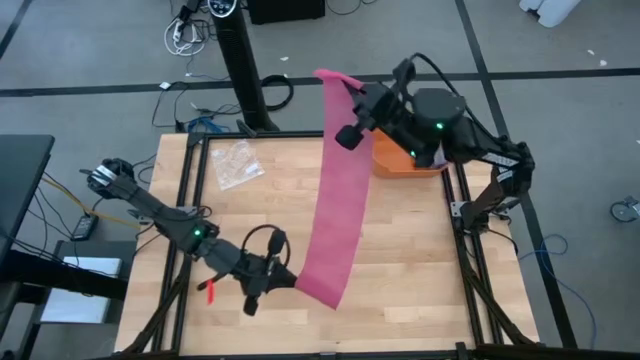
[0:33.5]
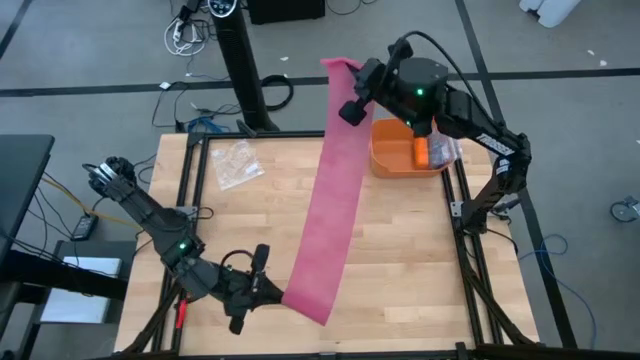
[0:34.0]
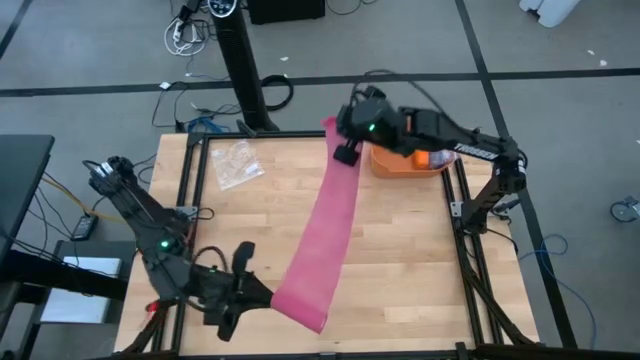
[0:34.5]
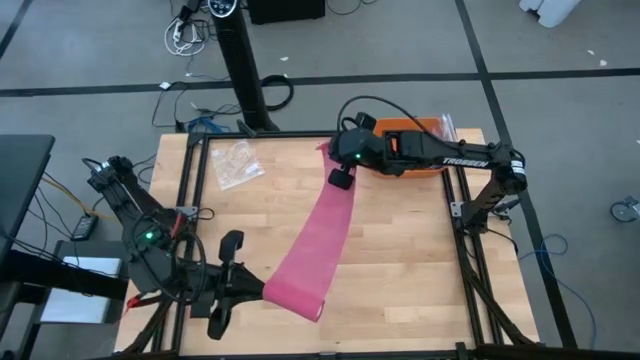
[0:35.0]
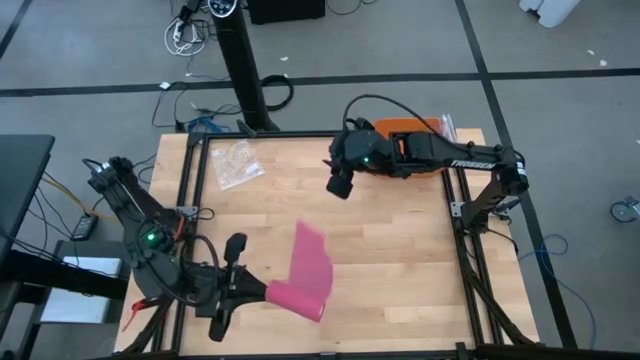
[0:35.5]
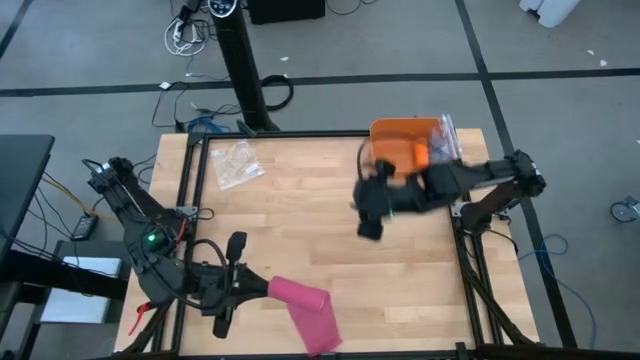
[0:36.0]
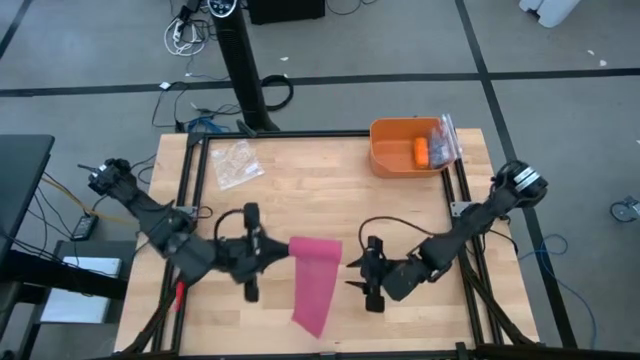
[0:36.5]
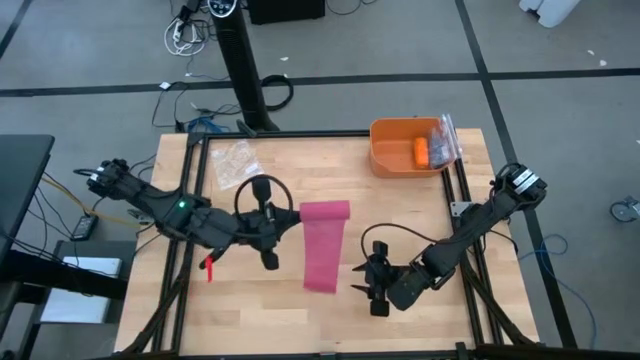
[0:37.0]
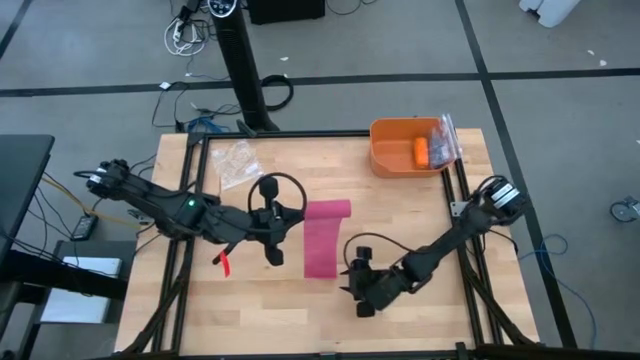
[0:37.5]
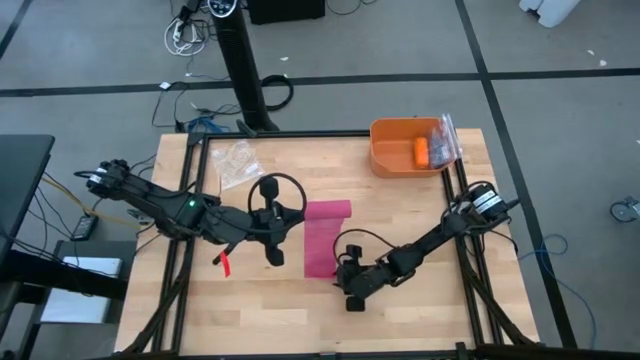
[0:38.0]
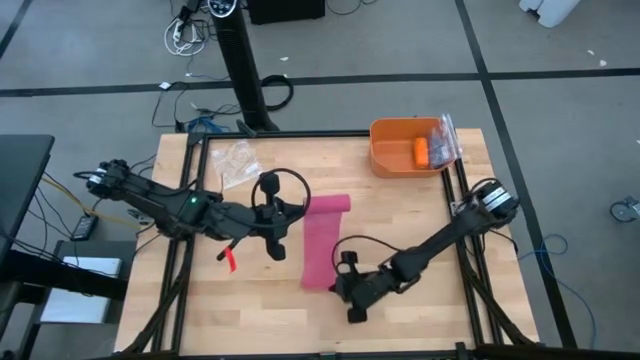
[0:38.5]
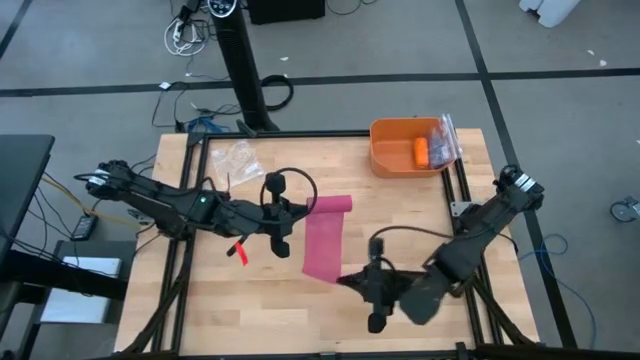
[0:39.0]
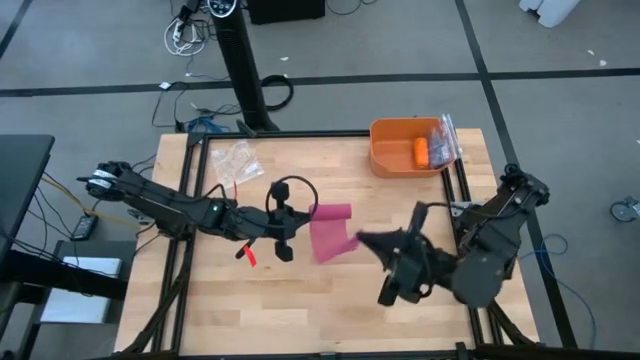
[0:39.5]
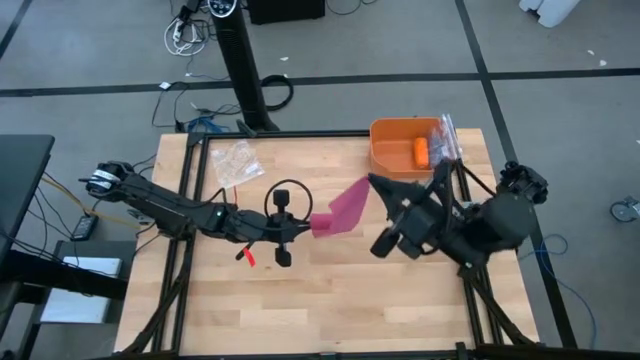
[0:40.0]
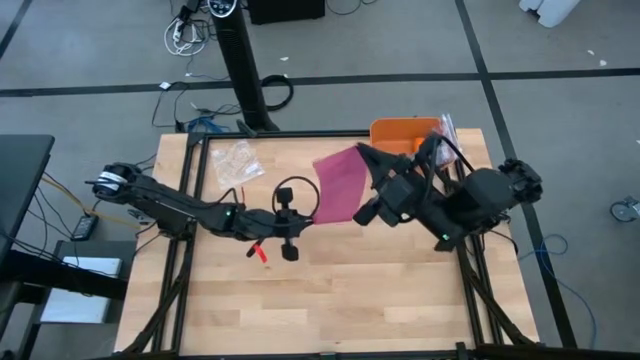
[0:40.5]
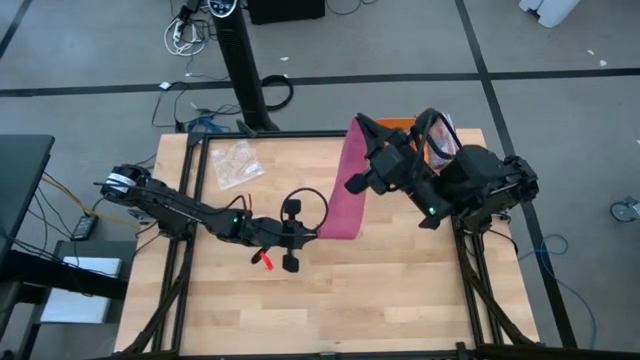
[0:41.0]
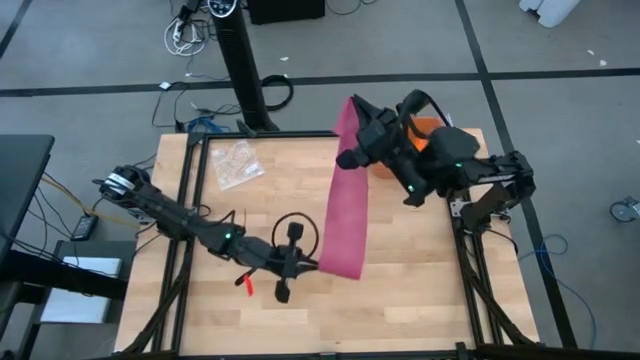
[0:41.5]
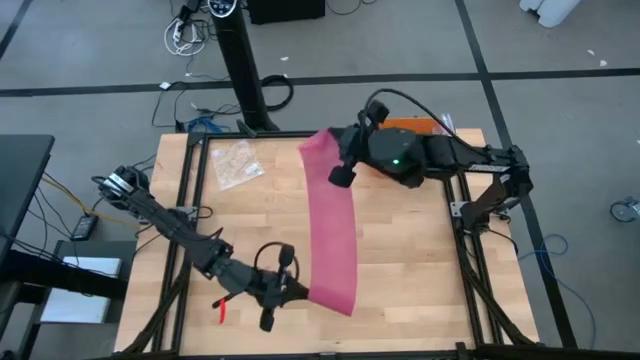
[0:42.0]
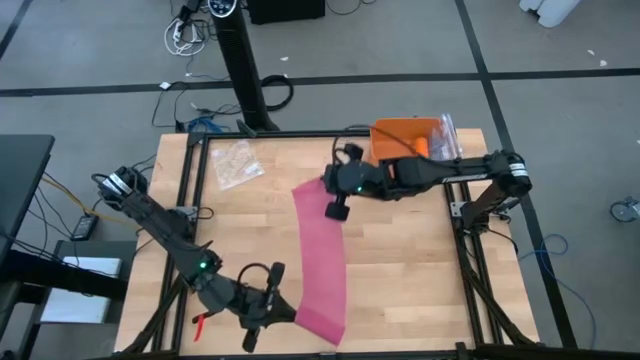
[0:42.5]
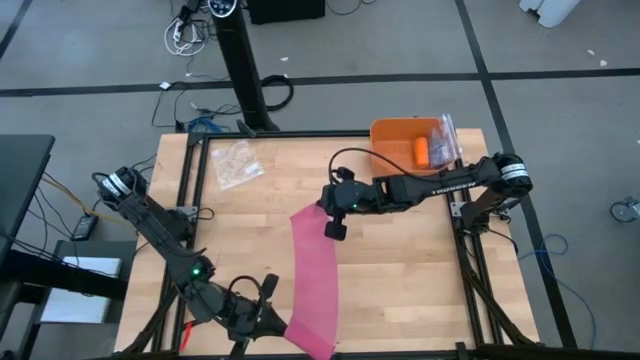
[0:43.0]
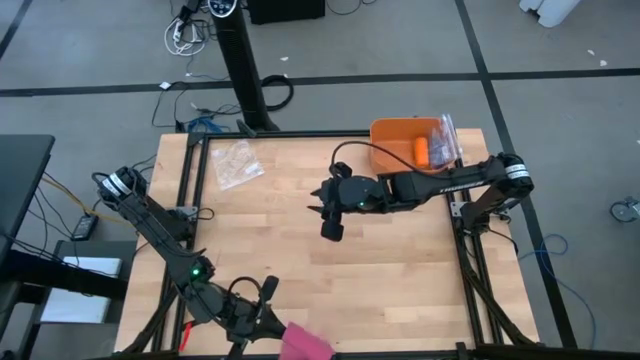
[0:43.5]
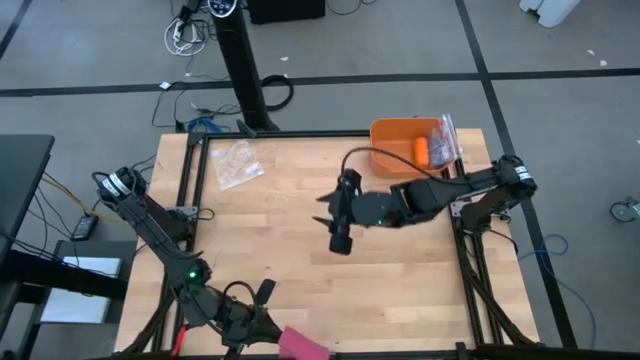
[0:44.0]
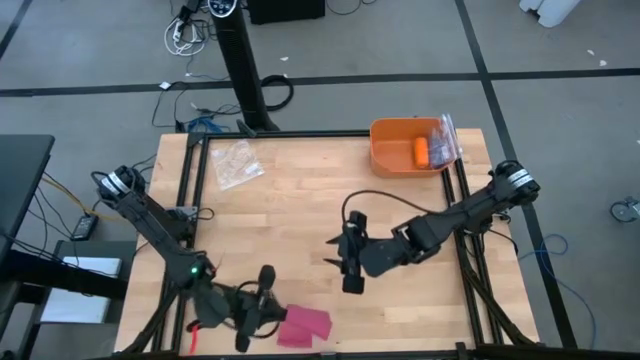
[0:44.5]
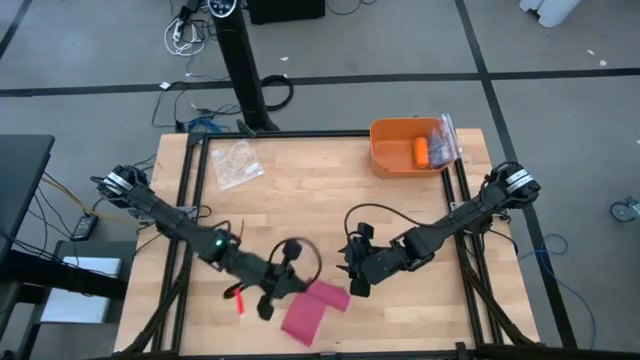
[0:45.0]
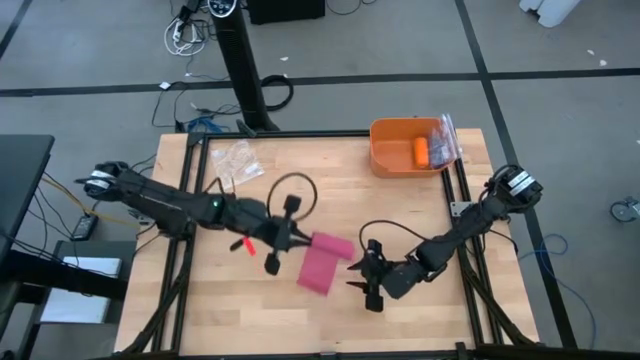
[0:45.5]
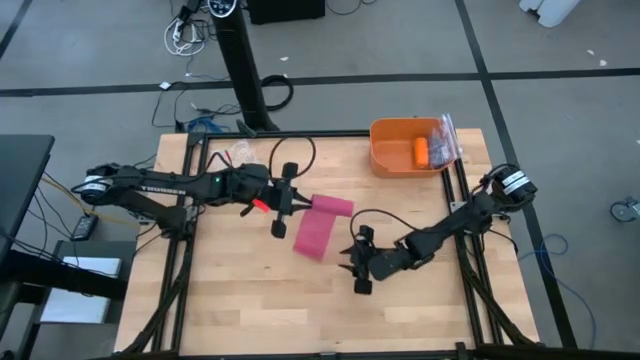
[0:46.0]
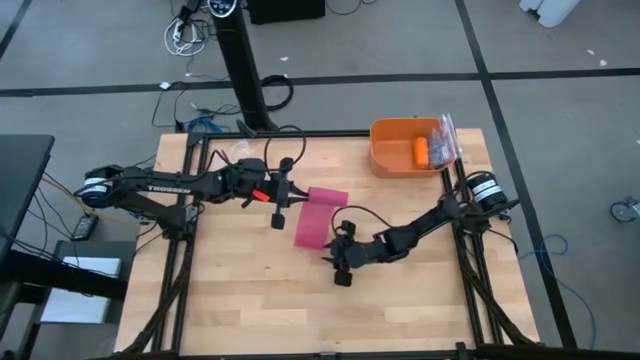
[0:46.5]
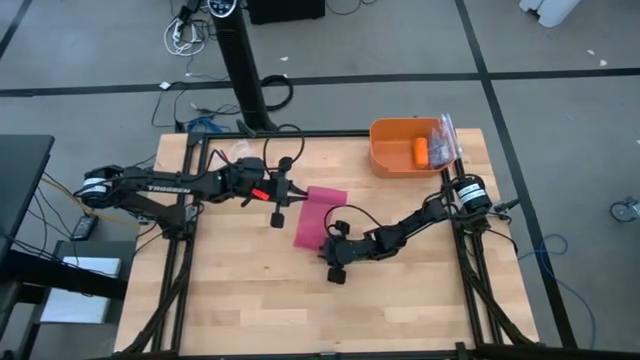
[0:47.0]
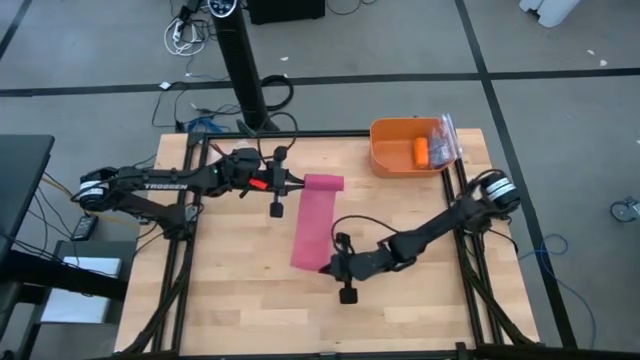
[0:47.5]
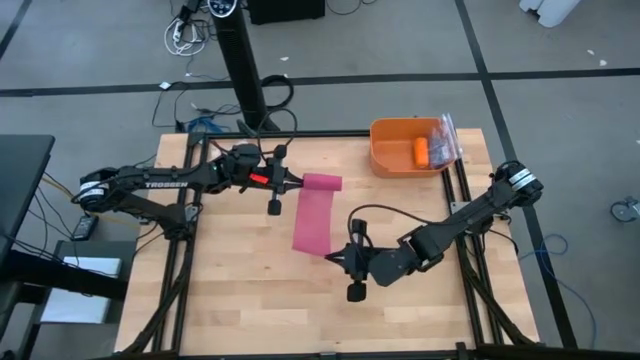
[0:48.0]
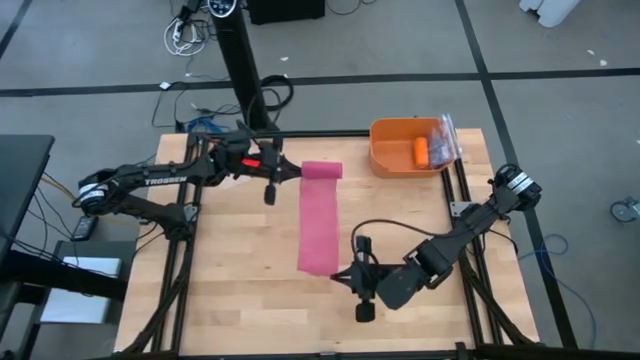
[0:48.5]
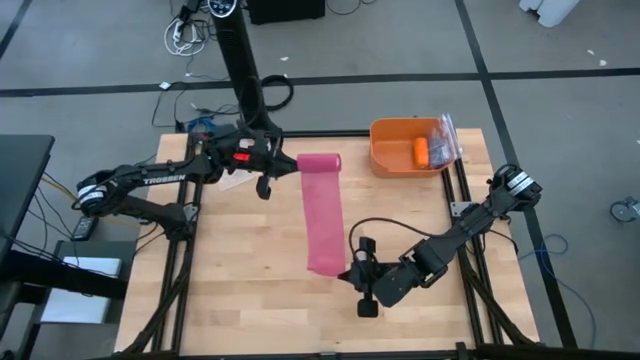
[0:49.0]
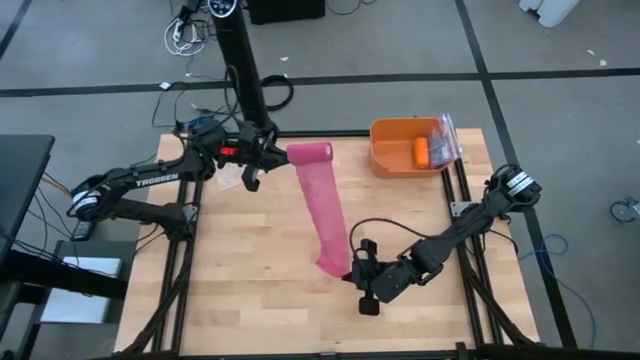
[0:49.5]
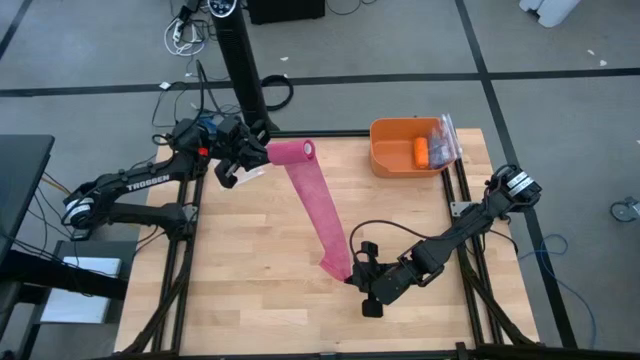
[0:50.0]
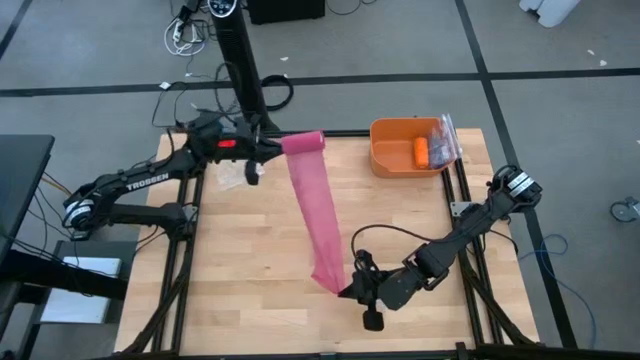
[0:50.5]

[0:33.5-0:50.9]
Task: Roll bandage
Roll the pink bandage

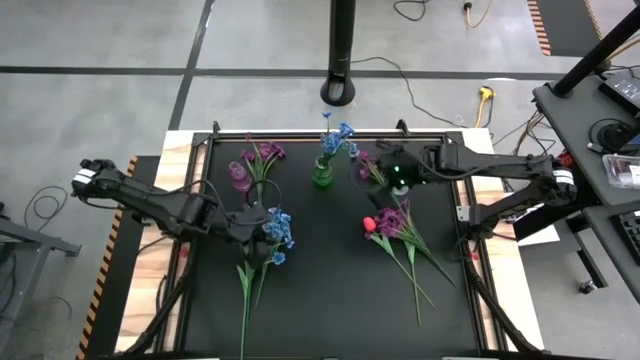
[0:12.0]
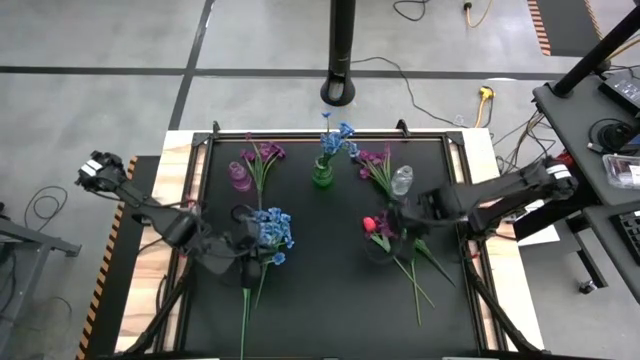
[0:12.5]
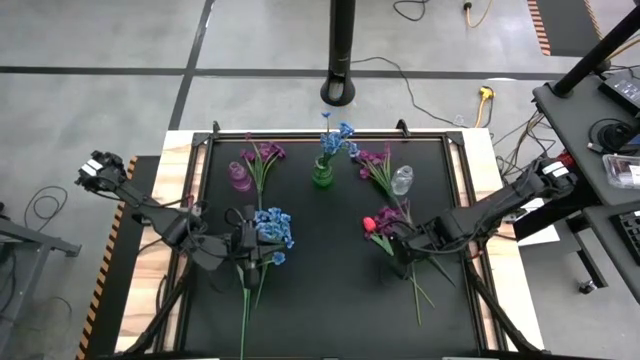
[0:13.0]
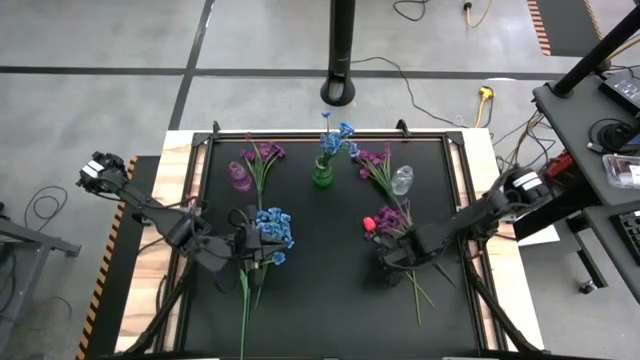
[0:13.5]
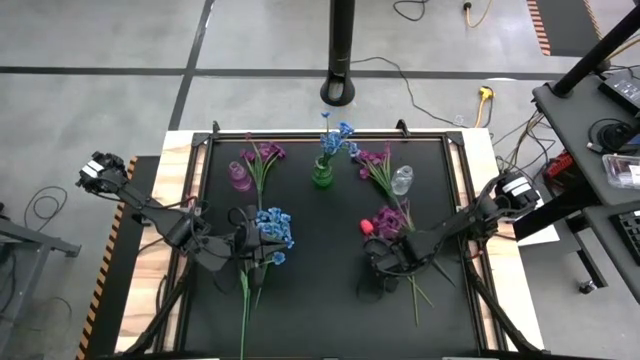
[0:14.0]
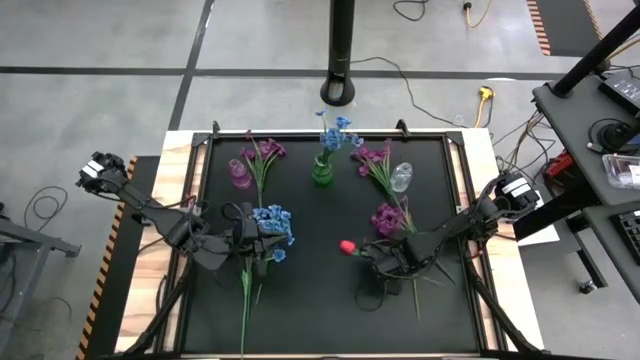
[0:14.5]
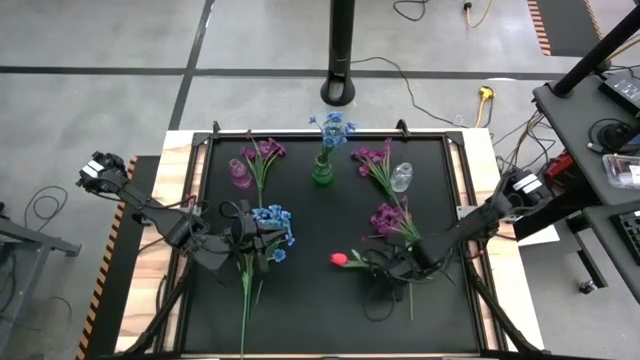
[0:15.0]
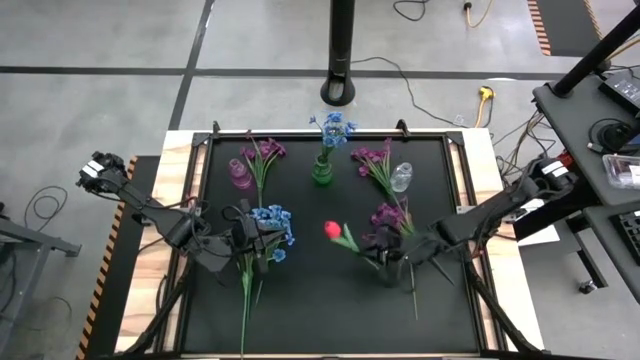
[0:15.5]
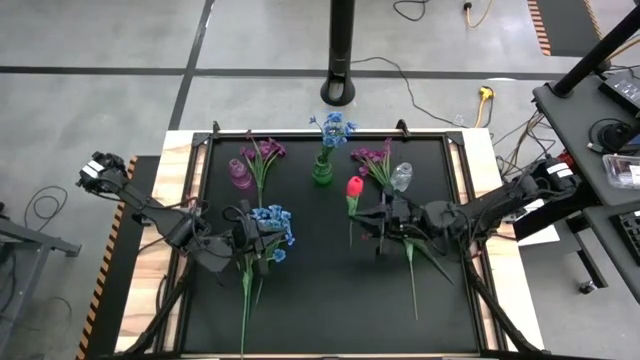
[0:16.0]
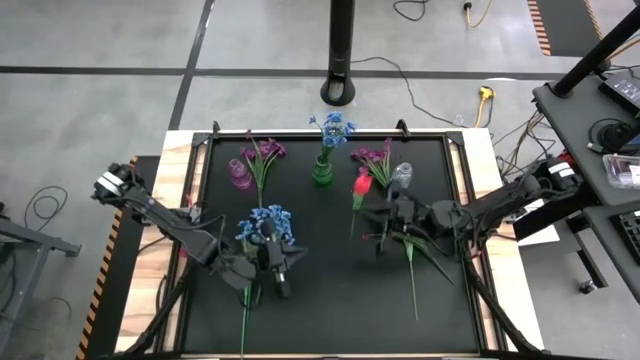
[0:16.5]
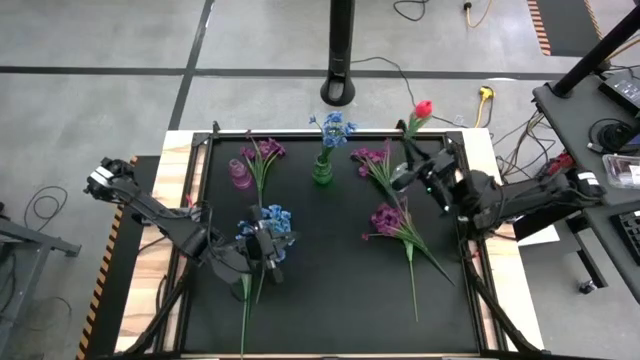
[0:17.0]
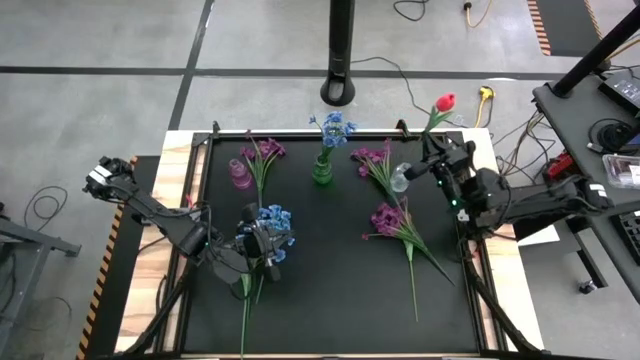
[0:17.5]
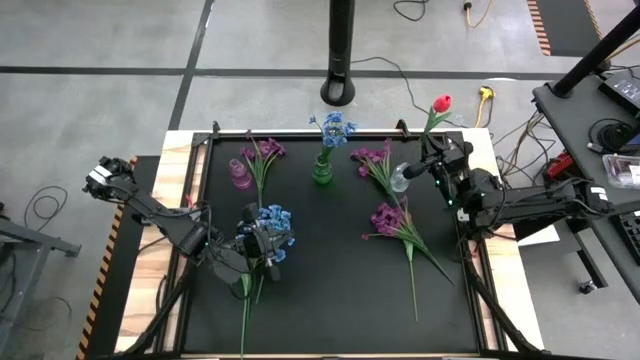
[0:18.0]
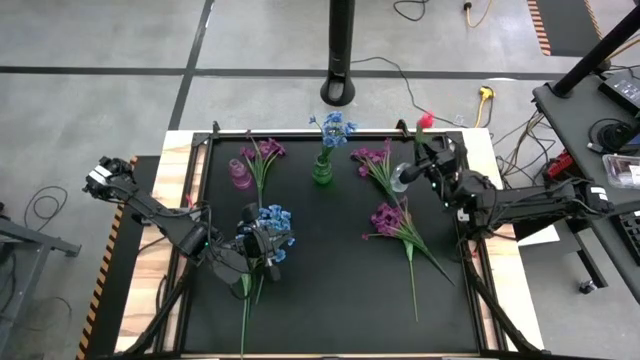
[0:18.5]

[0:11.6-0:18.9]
Task: Sort flowers into vase by color
Put the middle left red tulip into the transparent vase
